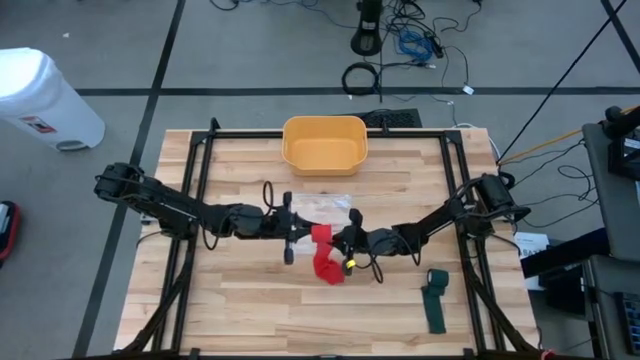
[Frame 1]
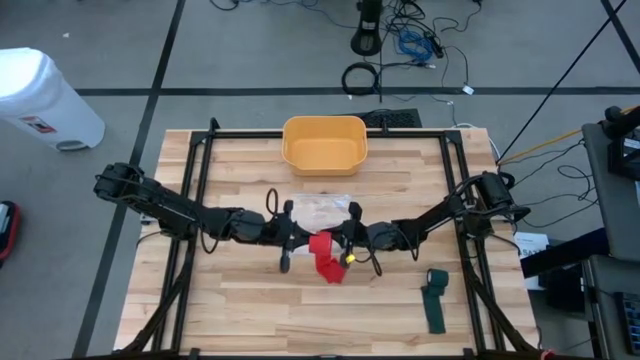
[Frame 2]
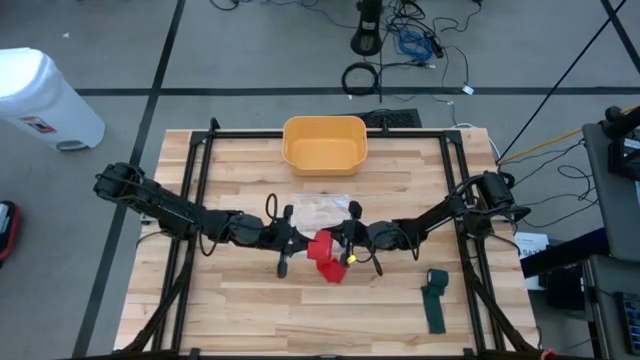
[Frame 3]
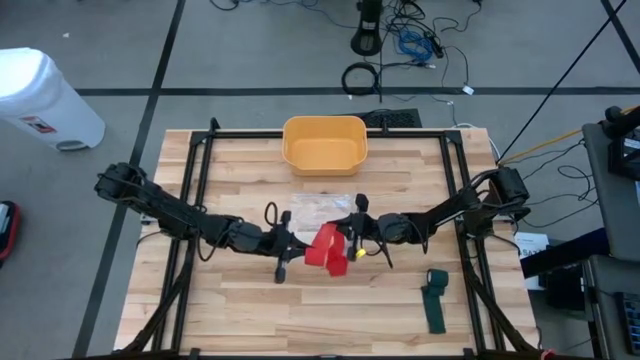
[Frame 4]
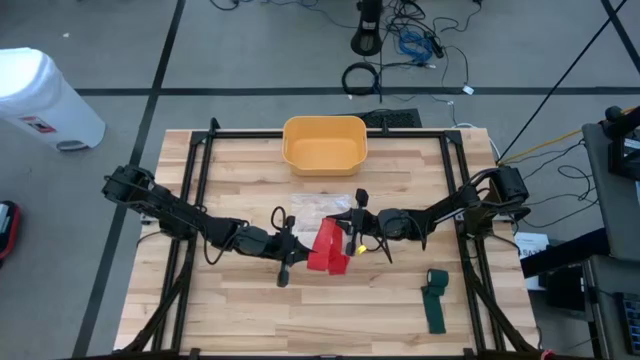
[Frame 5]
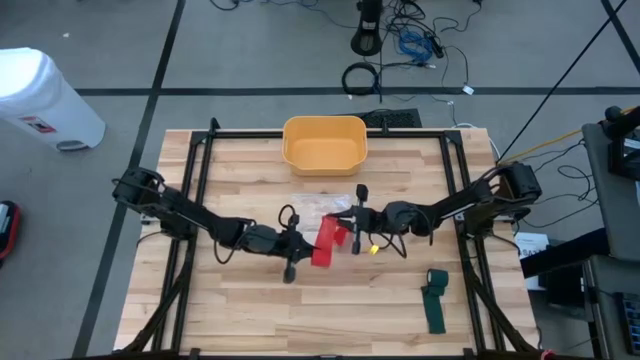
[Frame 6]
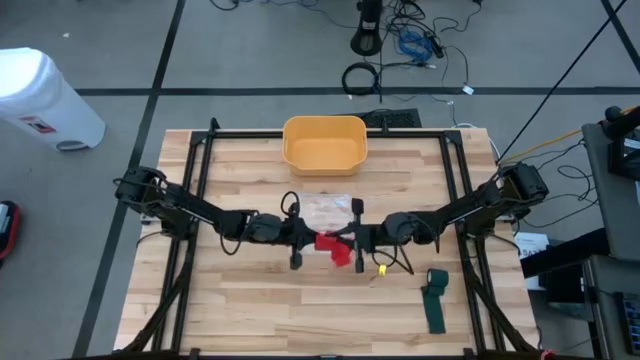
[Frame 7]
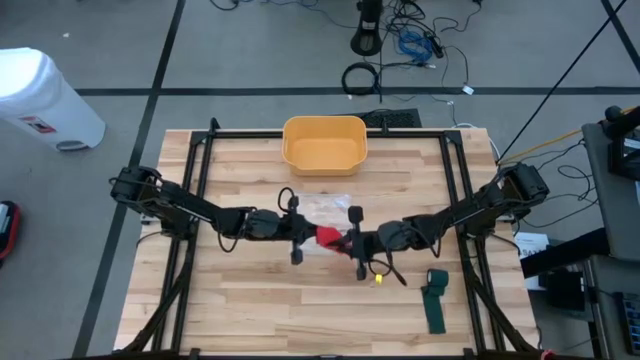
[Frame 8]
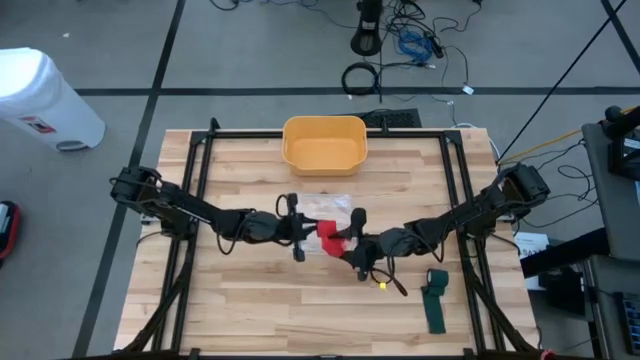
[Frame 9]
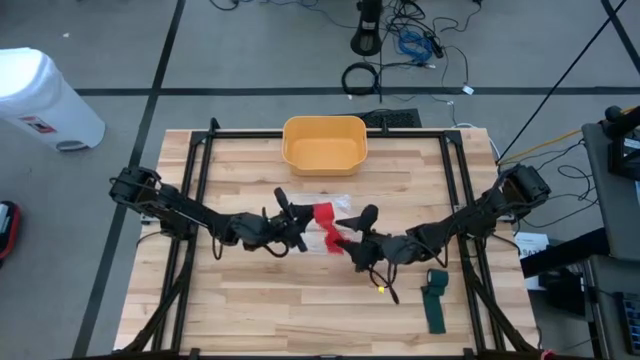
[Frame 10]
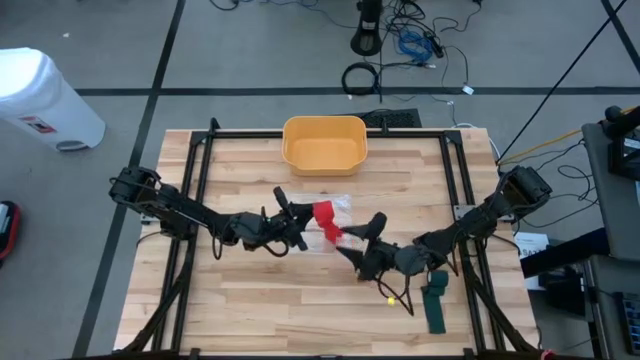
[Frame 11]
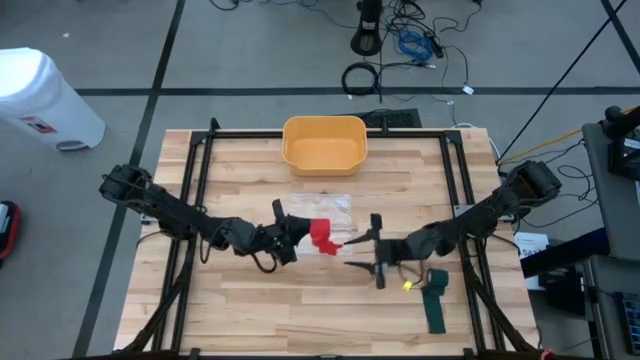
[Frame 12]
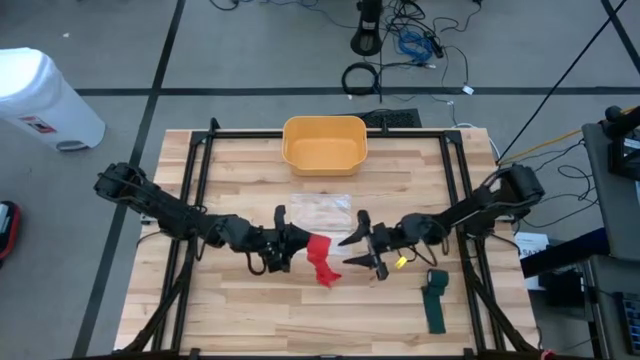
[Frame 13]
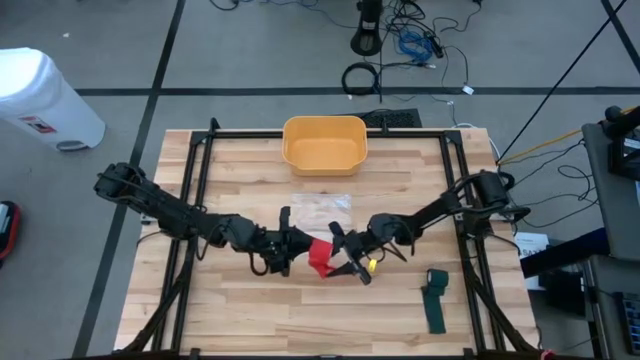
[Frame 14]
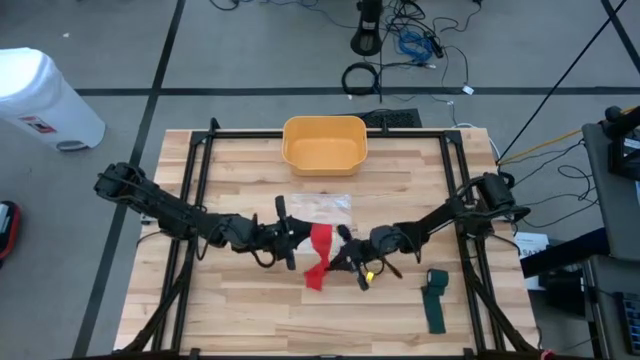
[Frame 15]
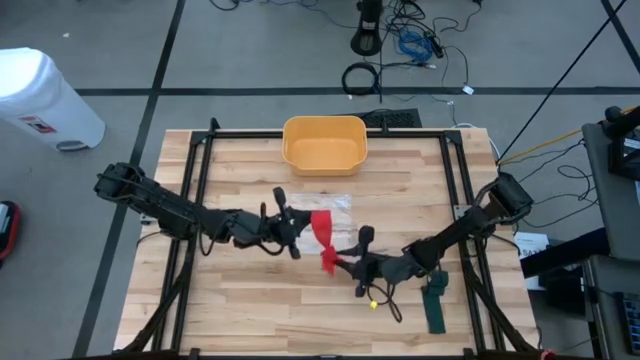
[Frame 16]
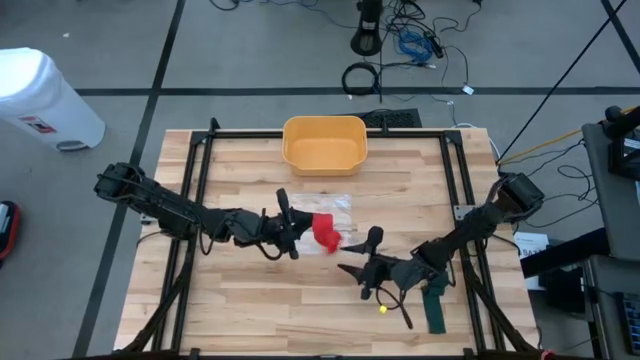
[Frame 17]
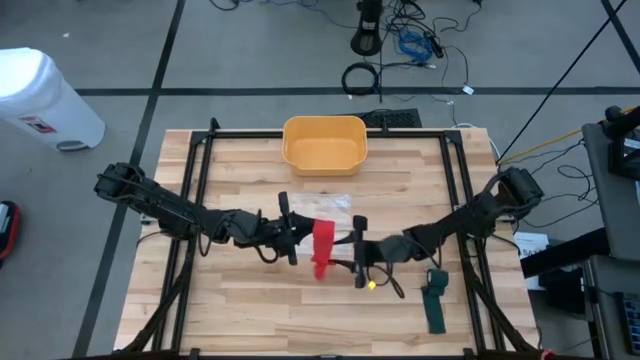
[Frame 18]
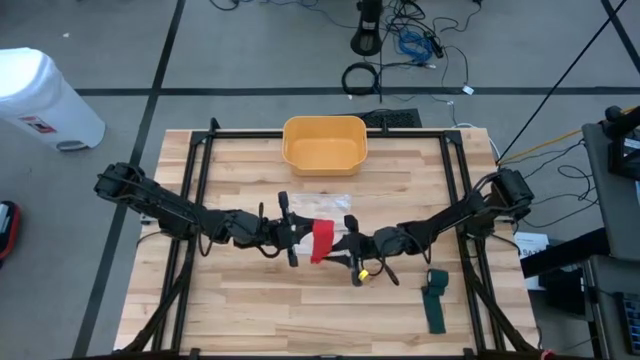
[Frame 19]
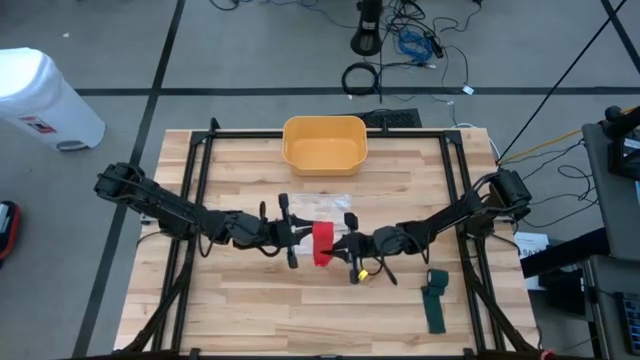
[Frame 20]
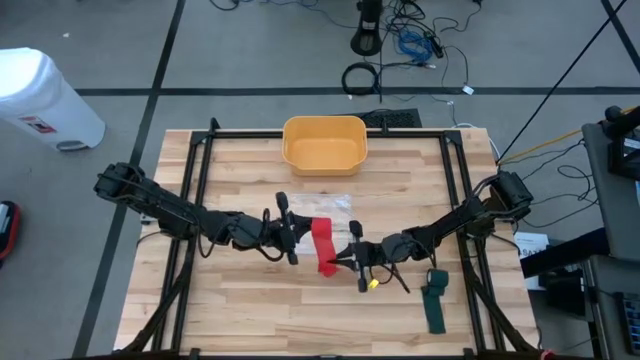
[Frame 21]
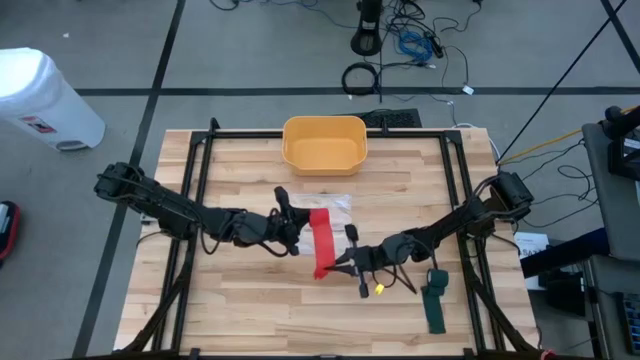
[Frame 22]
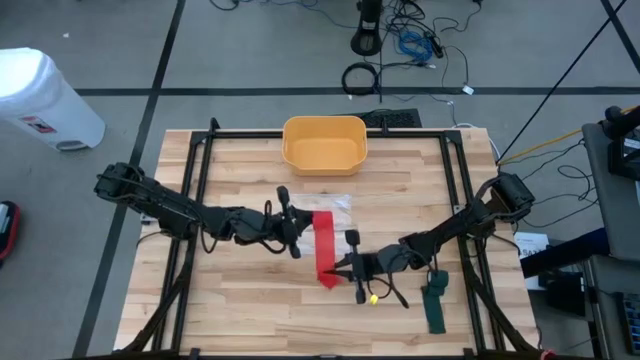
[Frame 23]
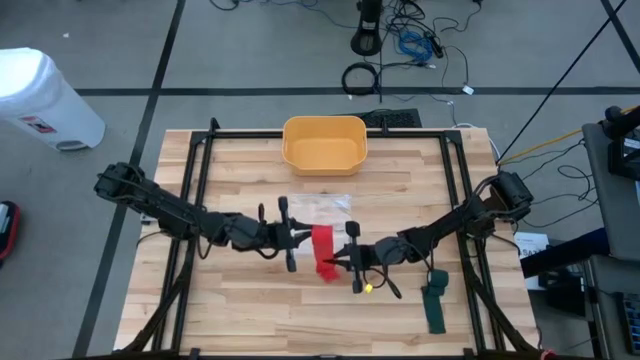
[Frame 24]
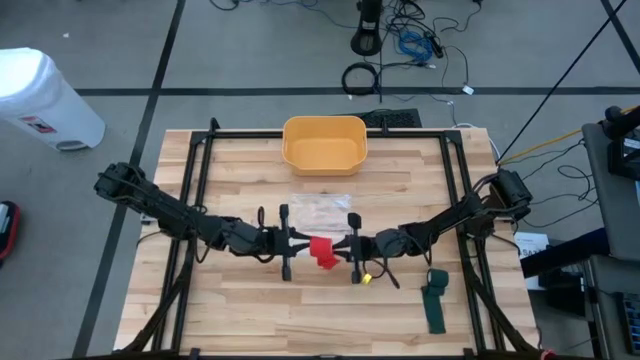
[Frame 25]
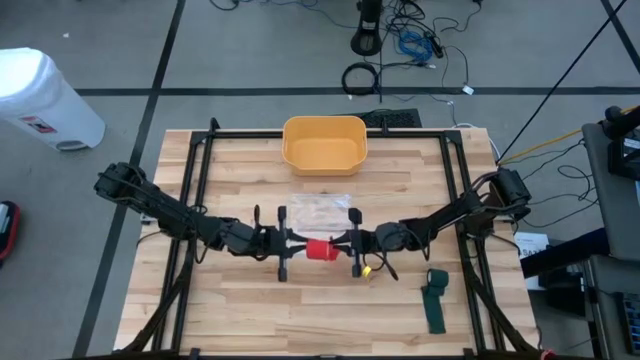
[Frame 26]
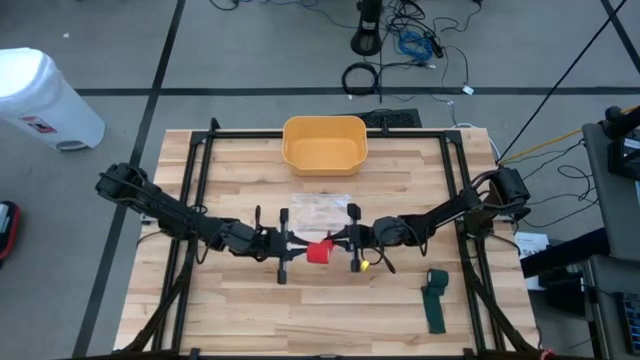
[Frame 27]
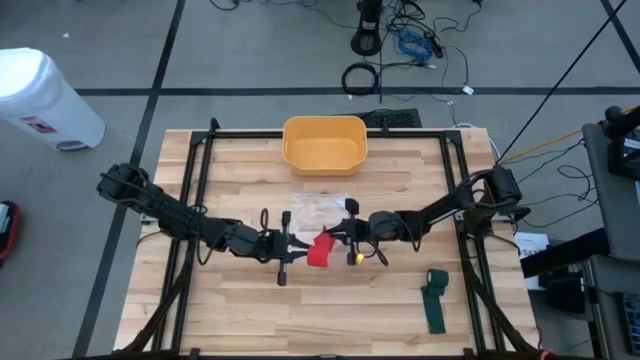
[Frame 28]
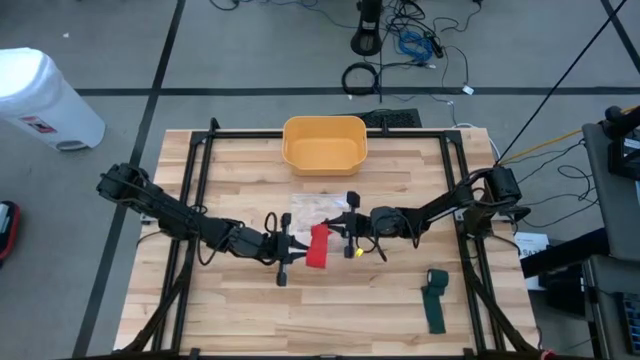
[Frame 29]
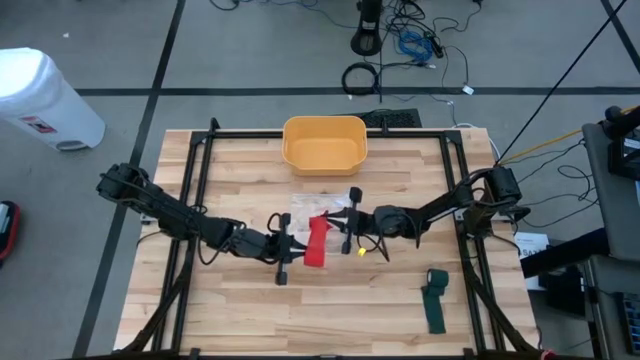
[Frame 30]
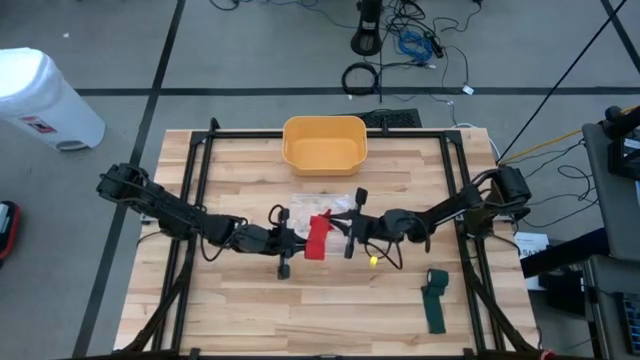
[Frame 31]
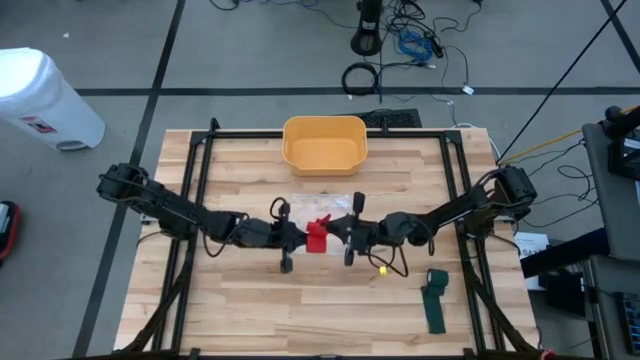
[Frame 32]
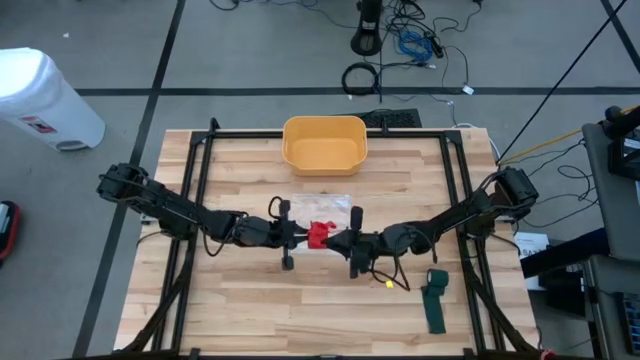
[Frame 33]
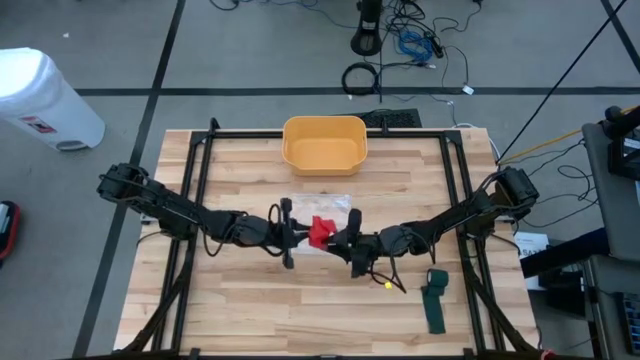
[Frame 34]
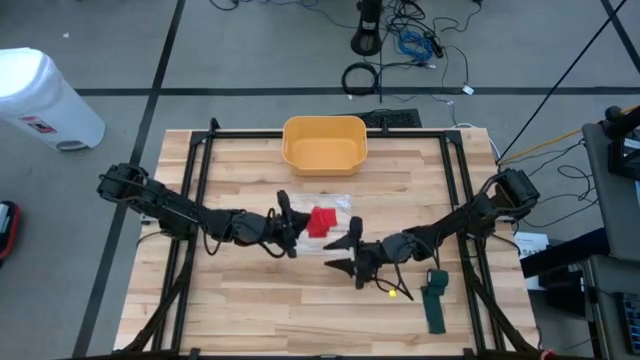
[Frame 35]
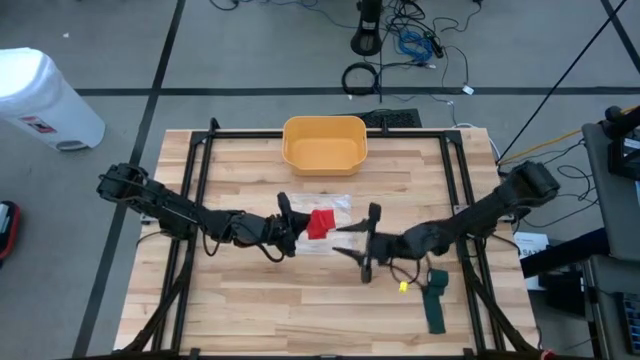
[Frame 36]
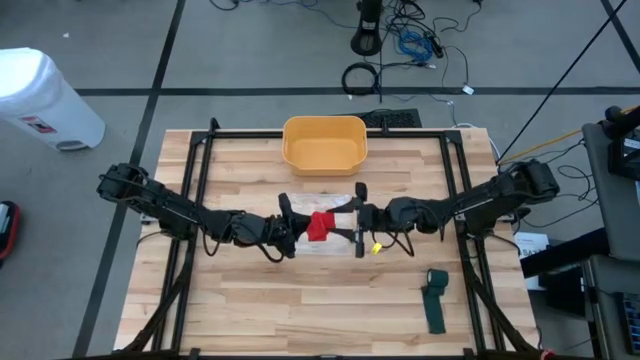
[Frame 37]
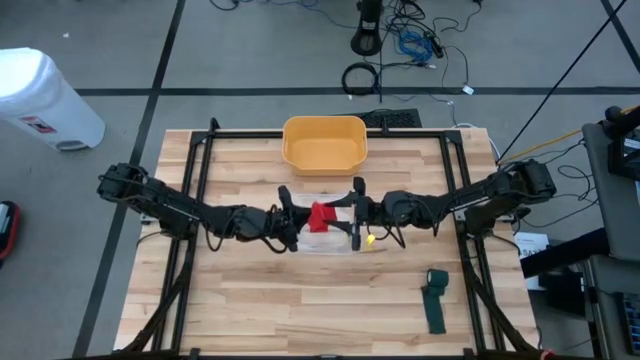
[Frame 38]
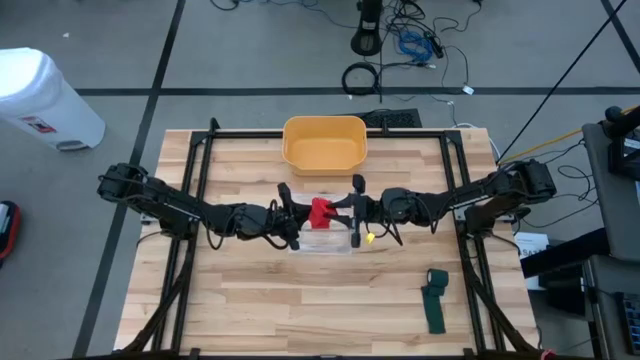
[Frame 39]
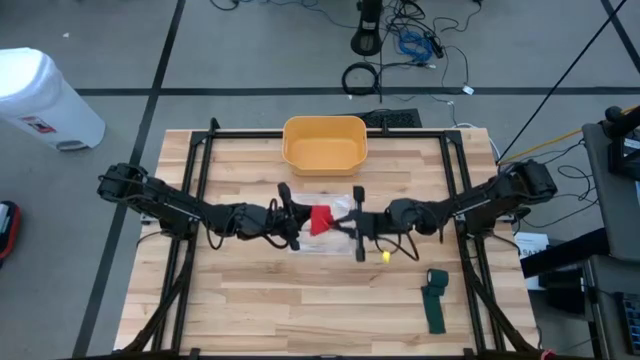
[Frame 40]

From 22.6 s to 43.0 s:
Task: Roll bandage
Roll the red bandage
